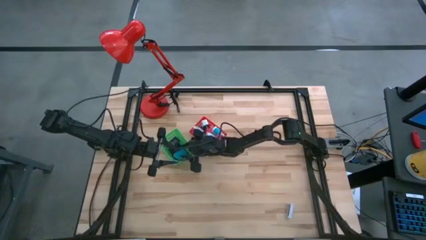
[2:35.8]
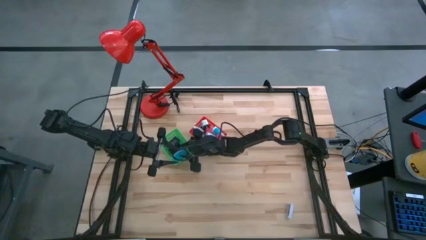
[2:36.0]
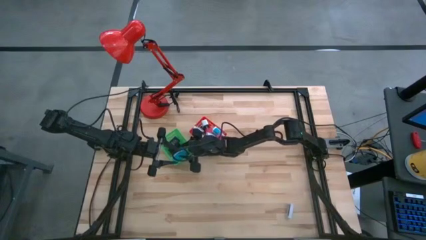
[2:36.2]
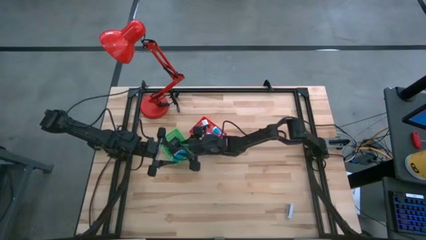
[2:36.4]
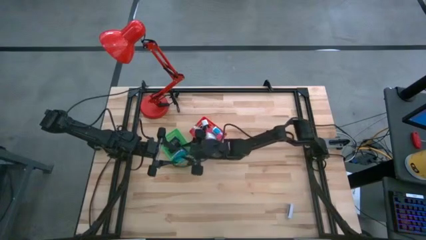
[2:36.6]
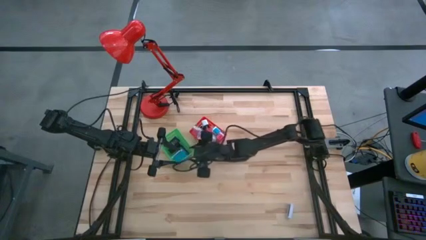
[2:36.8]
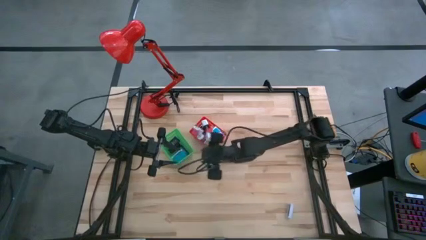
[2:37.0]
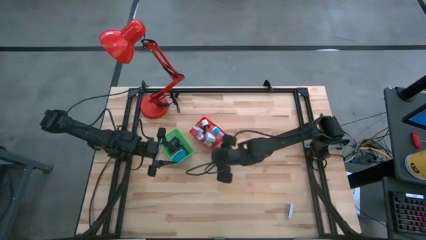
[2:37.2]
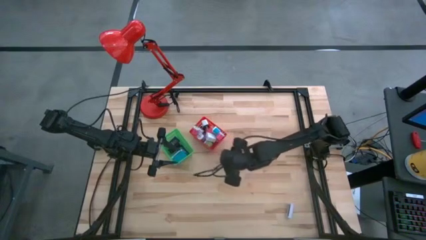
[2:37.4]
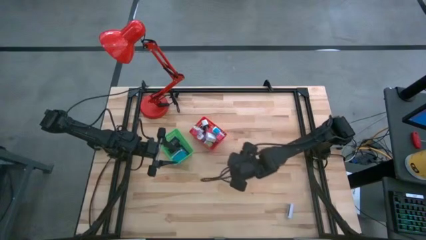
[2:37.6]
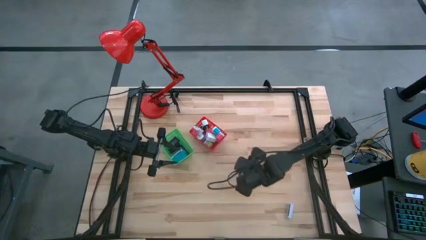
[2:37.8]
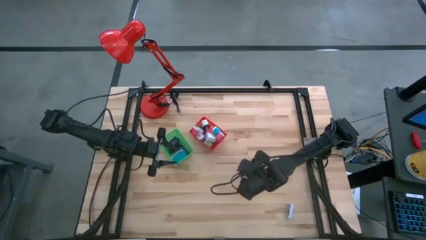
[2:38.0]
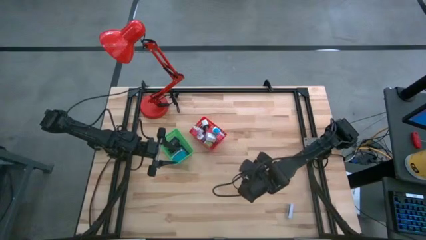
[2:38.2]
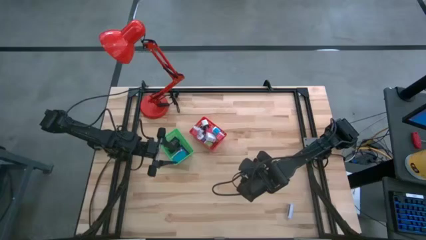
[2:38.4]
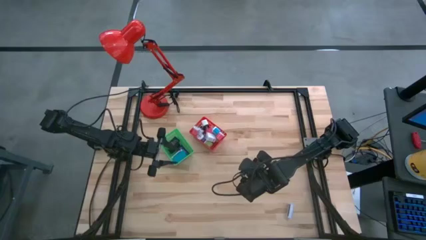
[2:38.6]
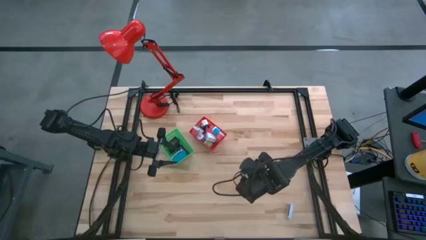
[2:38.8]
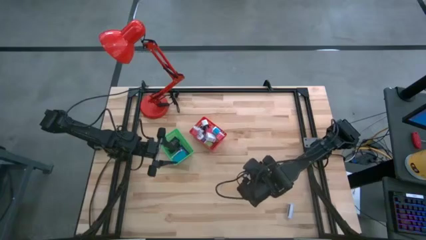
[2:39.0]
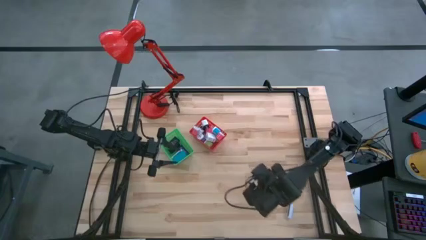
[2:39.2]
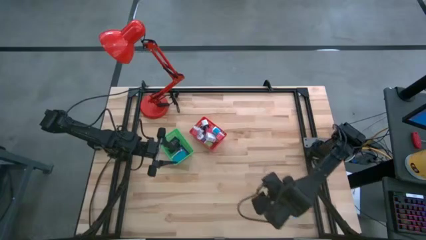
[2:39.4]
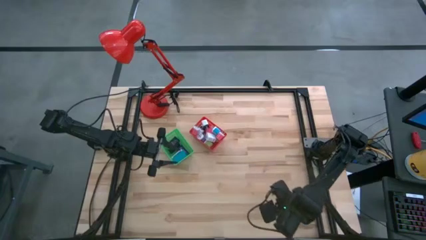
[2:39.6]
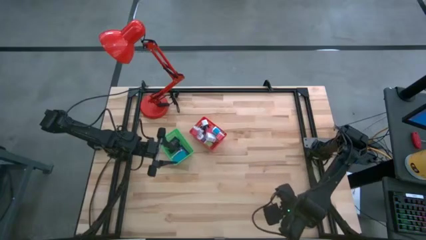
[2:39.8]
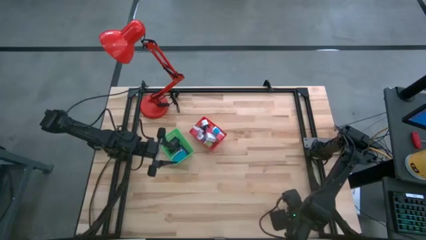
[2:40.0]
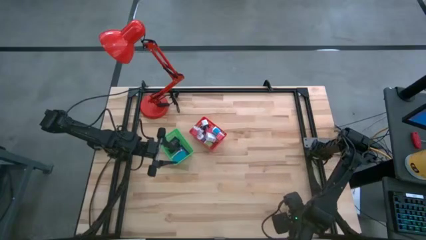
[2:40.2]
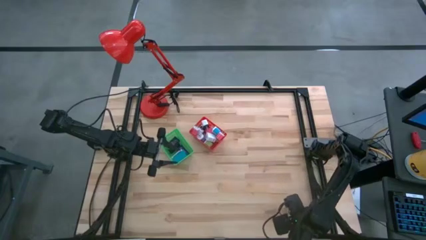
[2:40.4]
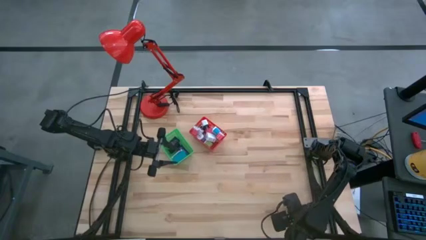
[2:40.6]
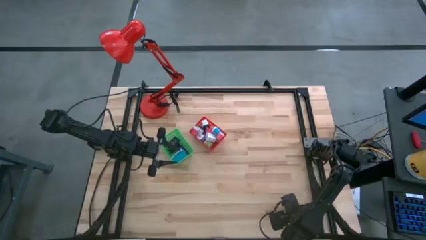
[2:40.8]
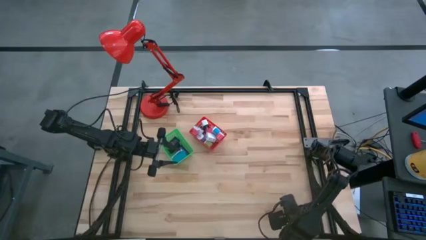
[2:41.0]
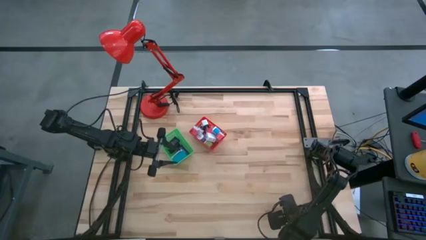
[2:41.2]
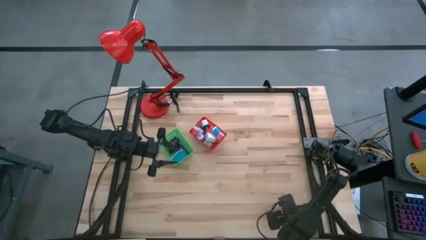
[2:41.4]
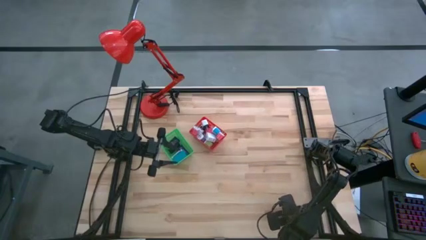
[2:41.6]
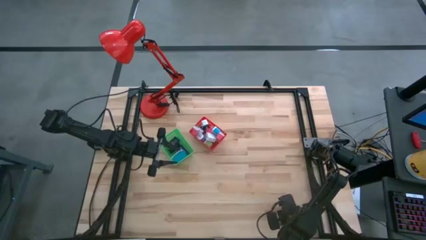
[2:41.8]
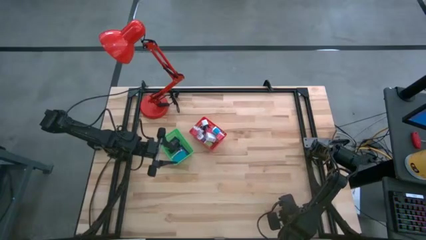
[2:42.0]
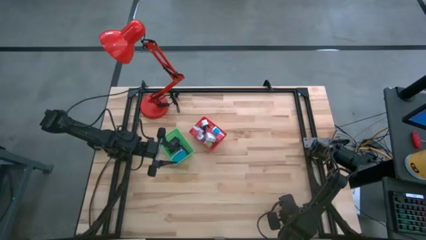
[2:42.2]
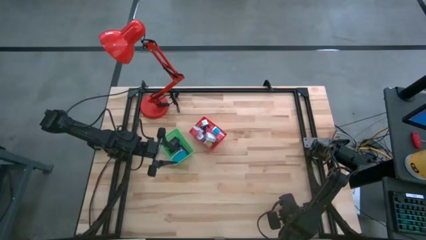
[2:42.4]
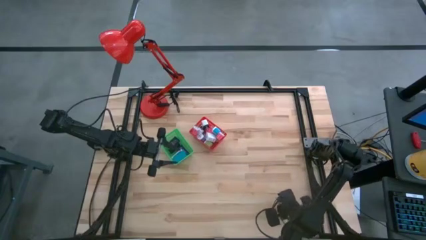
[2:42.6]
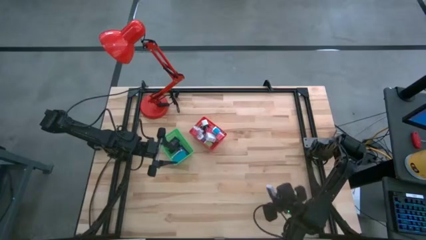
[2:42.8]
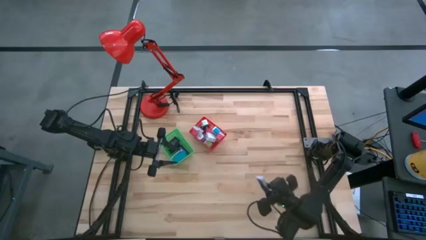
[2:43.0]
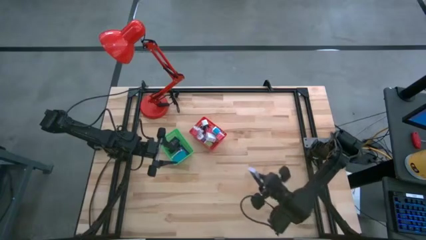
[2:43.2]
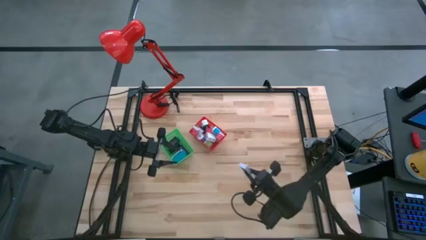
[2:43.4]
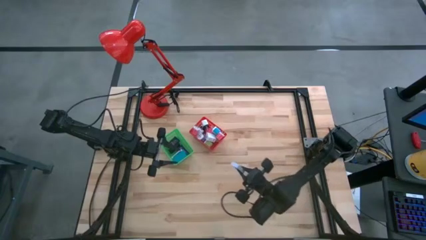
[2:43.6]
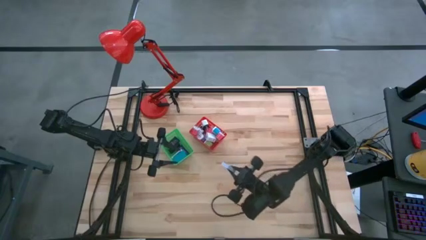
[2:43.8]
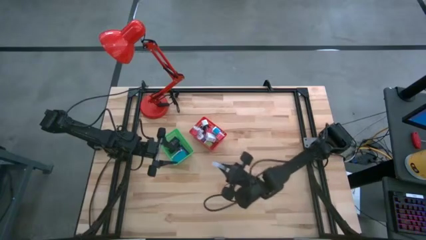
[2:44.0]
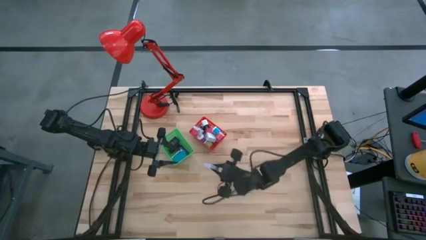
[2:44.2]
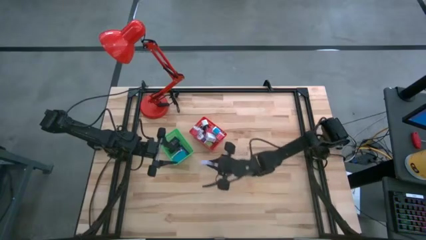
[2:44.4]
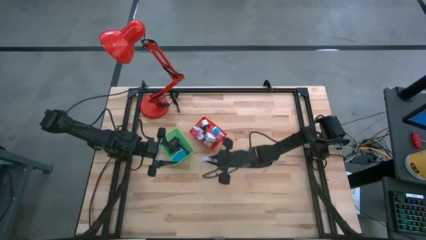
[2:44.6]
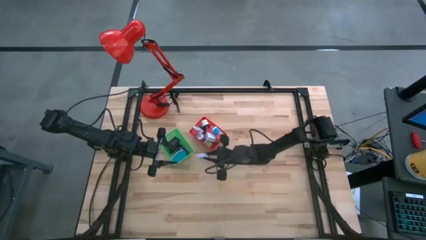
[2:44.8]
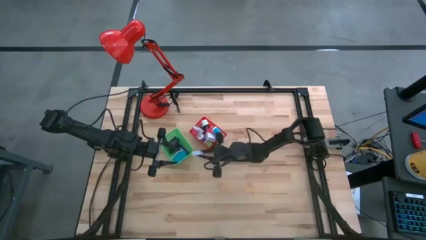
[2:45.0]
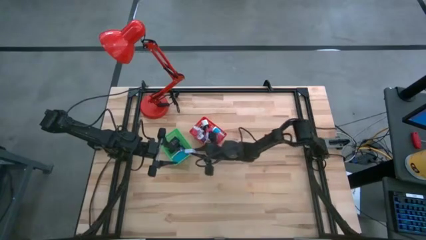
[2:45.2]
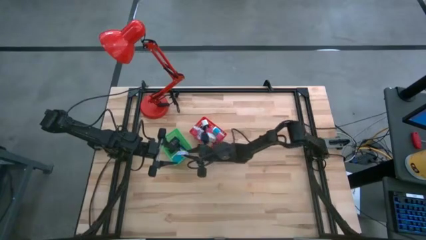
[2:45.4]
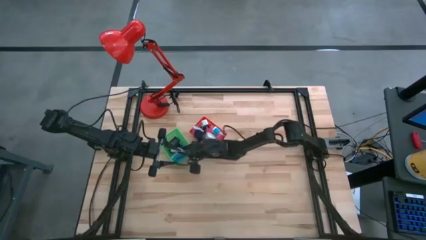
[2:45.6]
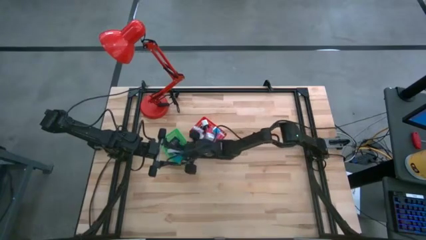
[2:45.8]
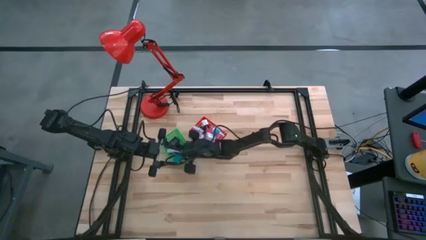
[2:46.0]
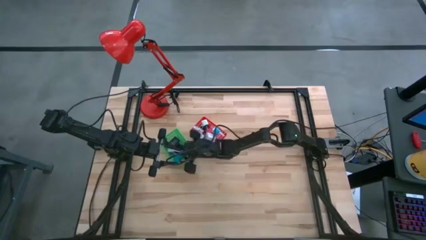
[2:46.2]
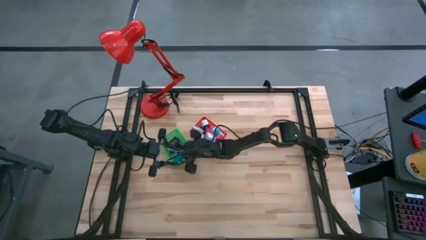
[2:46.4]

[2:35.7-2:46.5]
Task: Pick & Place Office items
Put the white timer into the green bin

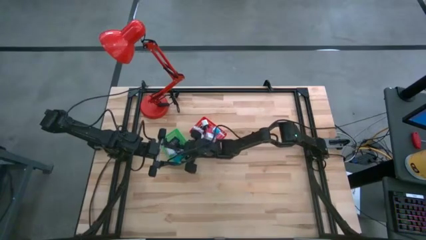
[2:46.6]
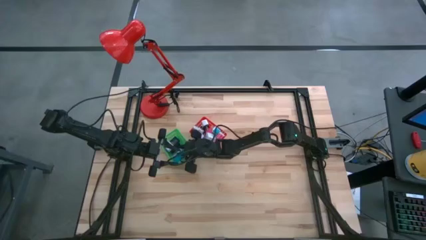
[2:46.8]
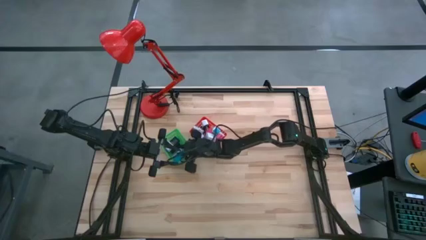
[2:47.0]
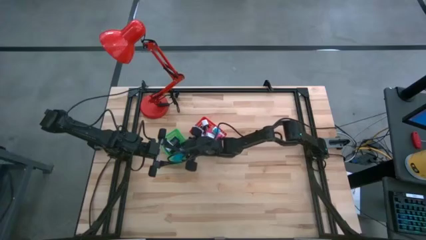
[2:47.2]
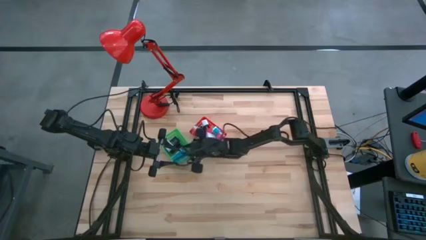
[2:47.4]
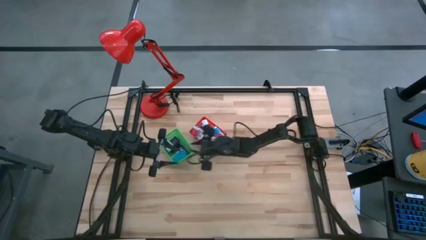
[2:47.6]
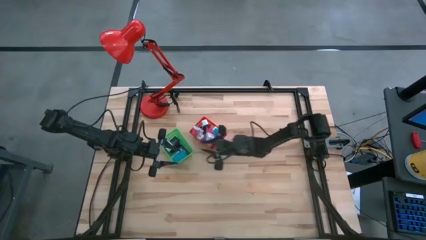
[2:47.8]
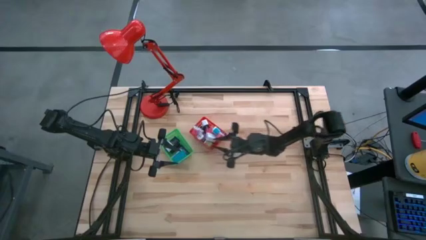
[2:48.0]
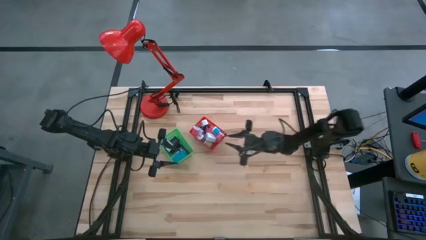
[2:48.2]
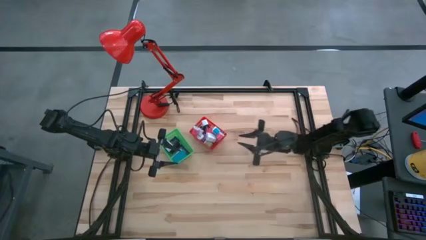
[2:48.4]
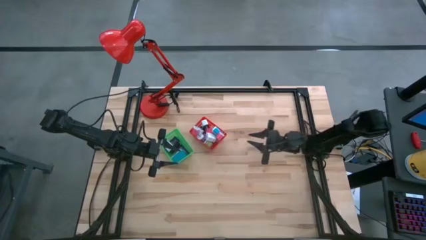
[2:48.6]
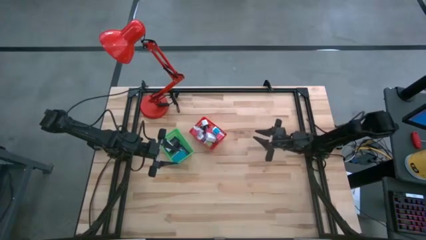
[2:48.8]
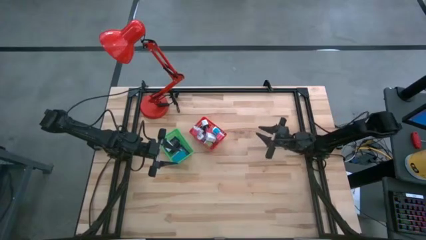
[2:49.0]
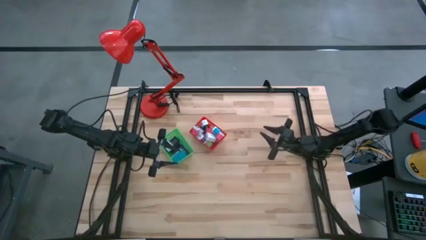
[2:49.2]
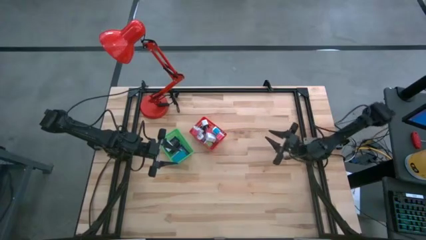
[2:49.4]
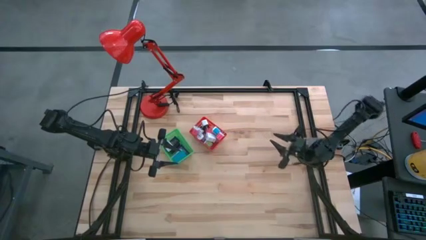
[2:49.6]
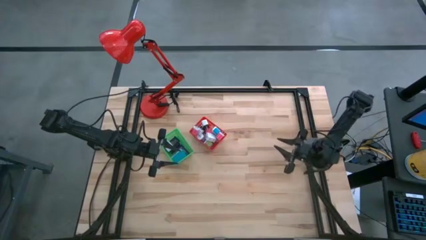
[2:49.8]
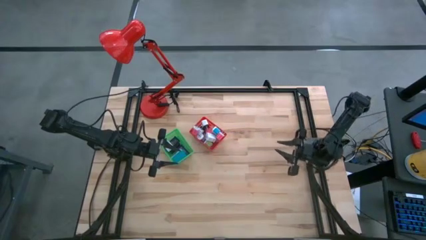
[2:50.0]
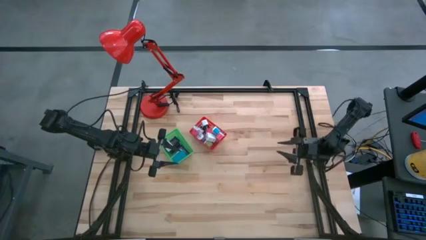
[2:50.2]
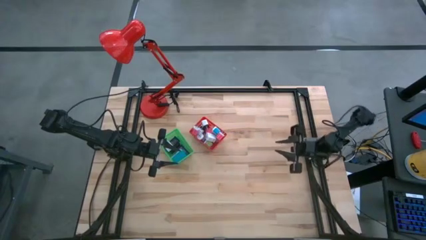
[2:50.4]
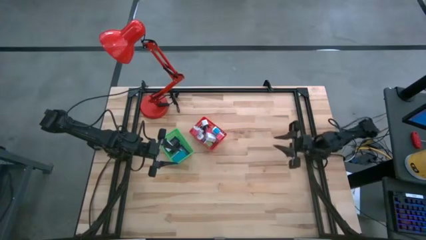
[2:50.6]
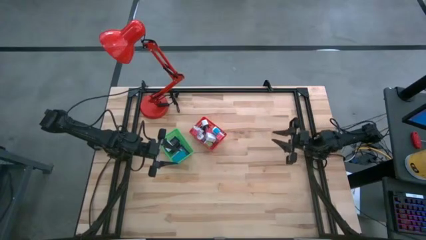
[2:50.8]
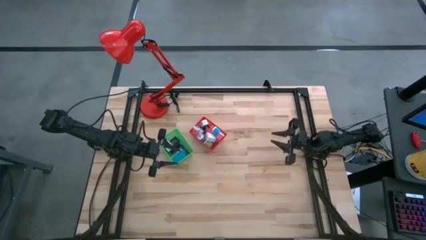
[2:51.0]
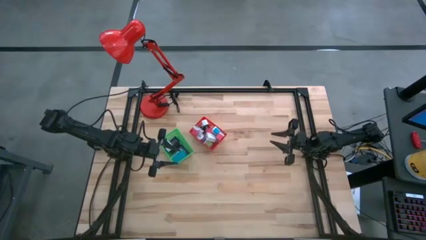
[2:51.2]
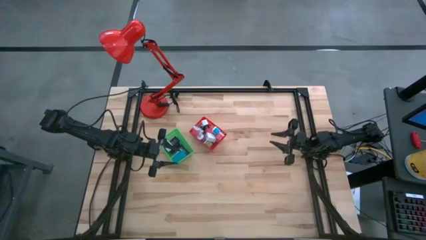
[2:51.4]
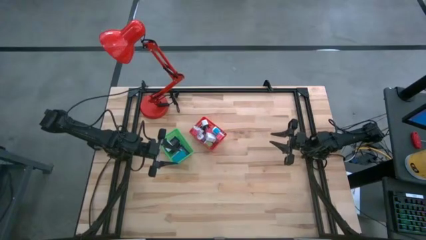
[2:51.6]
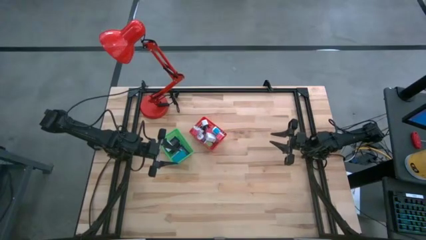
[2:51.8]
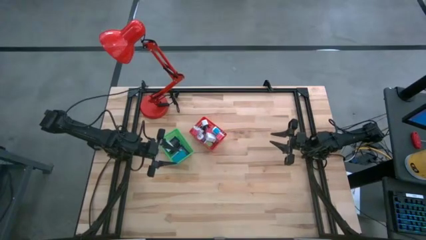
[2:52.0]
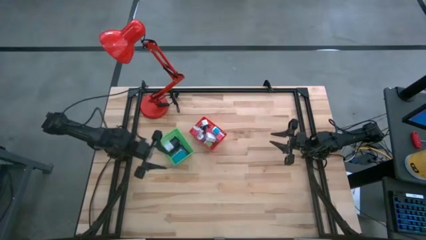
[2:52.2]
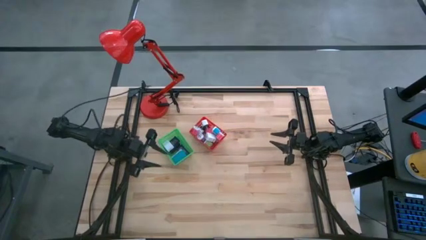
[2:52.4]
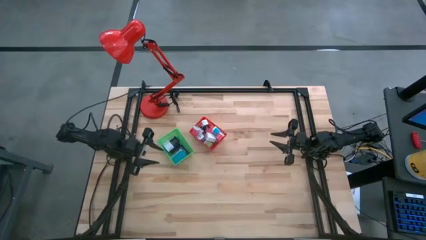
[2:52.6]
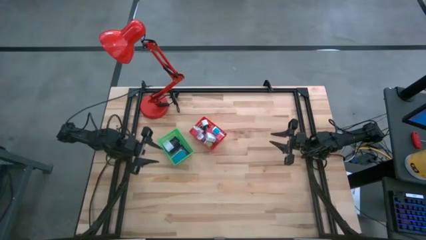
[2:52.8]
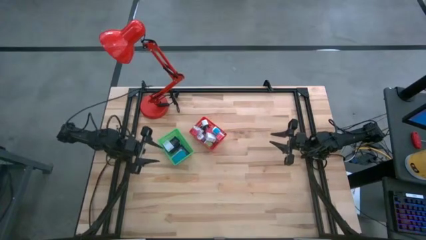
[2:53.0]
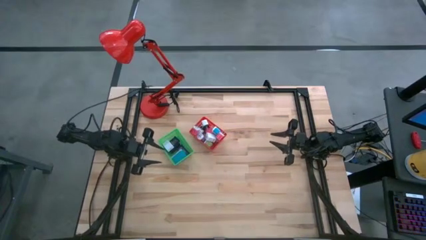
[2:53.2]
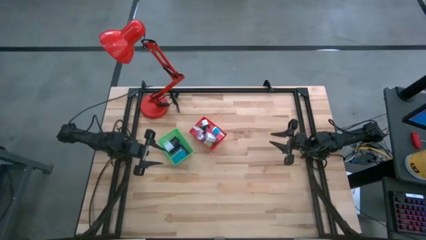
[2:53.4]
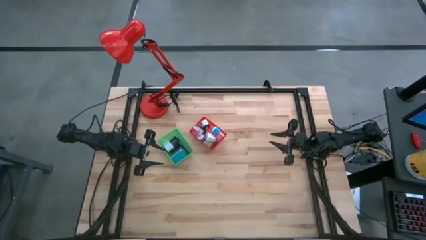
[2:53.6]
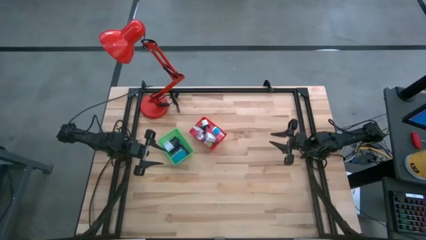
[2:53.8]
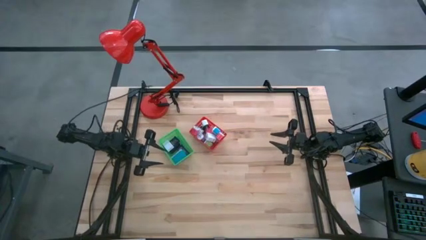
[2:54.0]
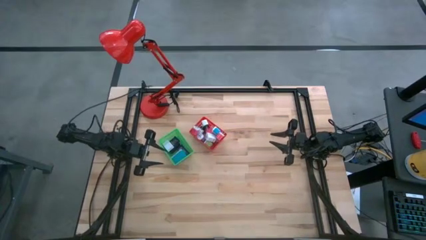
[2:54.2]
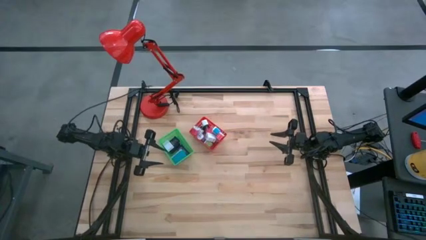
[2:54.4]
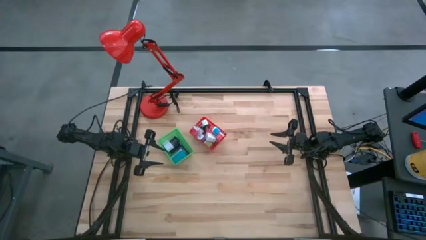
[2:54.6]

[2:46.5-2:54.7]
Return to Home Position
